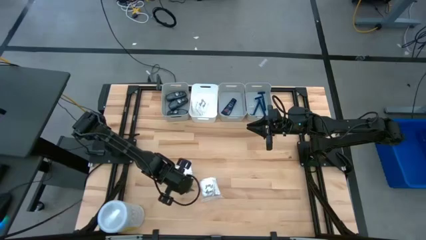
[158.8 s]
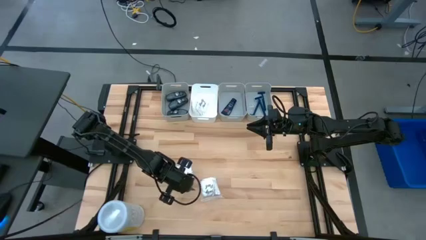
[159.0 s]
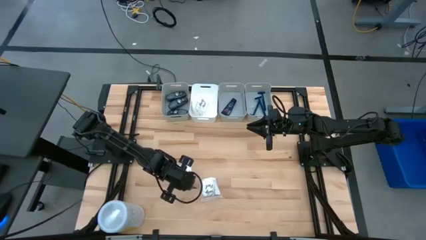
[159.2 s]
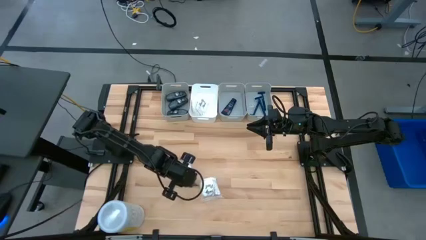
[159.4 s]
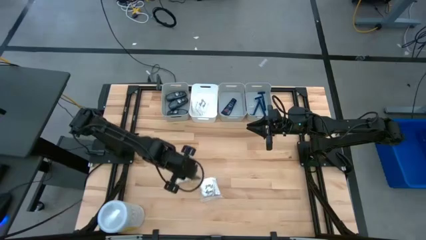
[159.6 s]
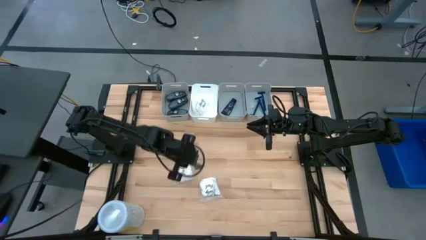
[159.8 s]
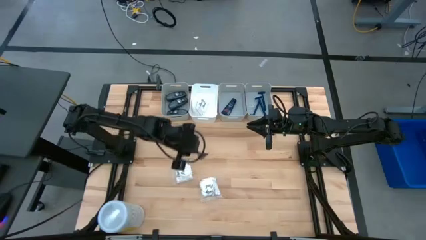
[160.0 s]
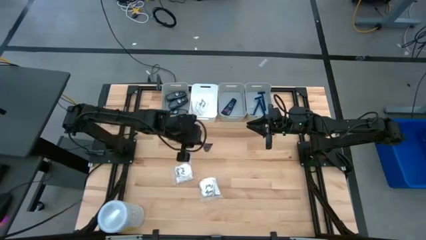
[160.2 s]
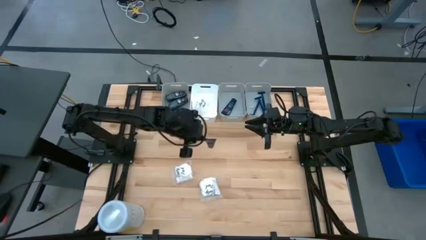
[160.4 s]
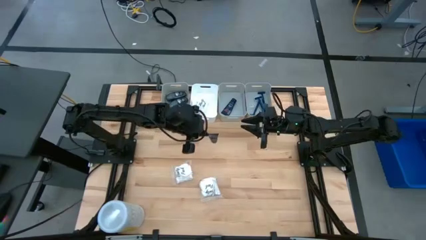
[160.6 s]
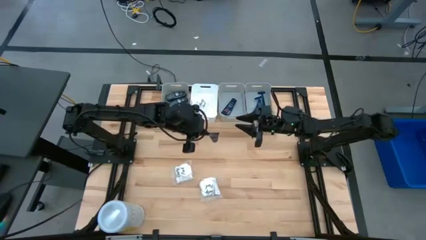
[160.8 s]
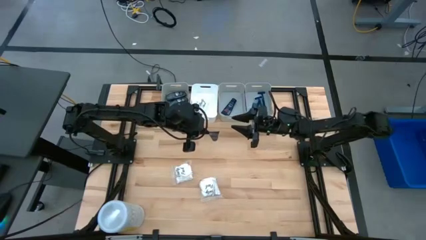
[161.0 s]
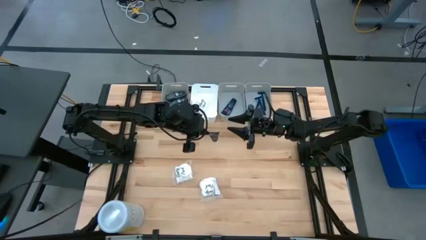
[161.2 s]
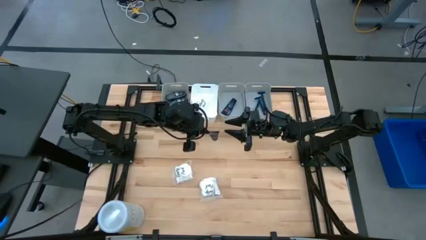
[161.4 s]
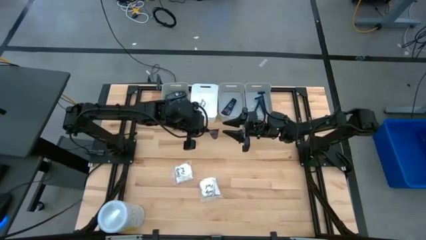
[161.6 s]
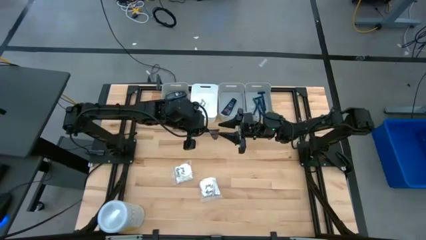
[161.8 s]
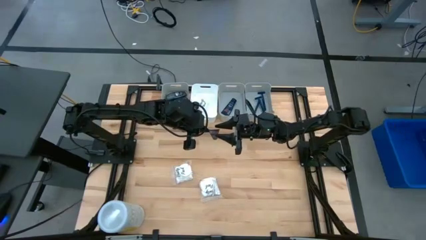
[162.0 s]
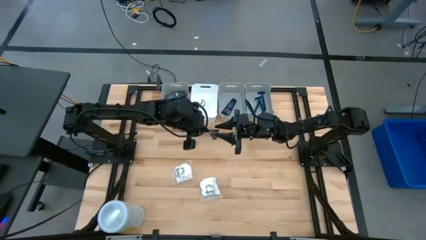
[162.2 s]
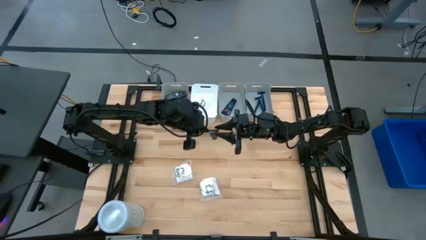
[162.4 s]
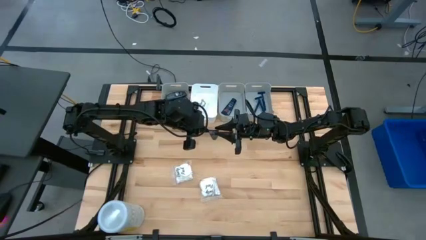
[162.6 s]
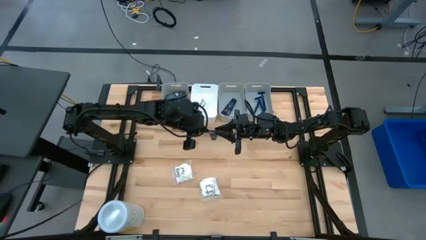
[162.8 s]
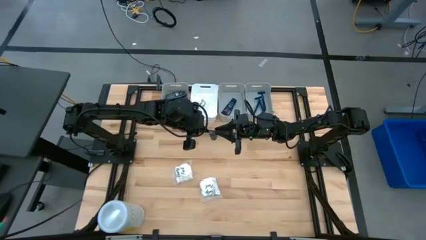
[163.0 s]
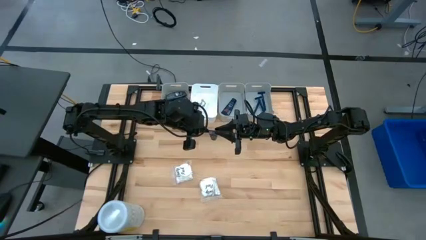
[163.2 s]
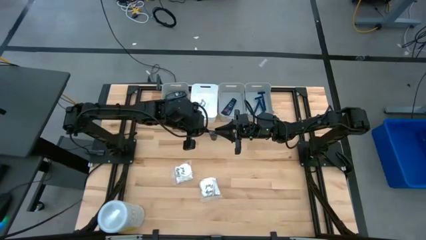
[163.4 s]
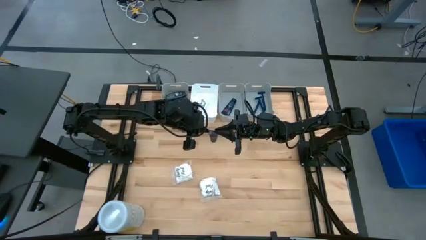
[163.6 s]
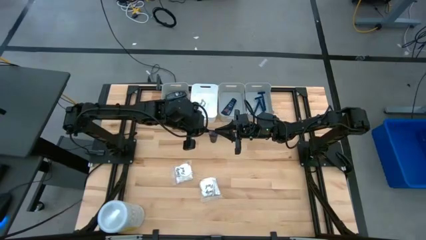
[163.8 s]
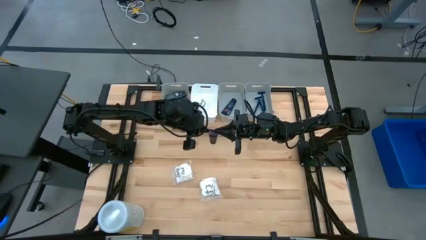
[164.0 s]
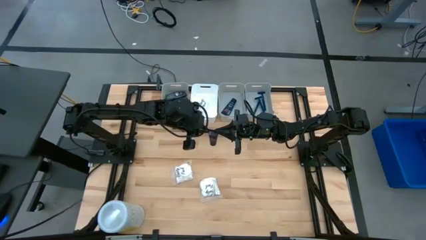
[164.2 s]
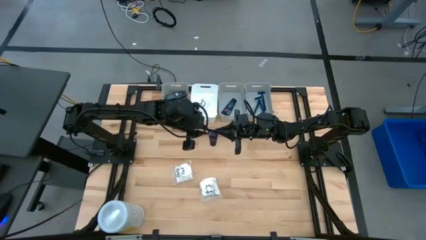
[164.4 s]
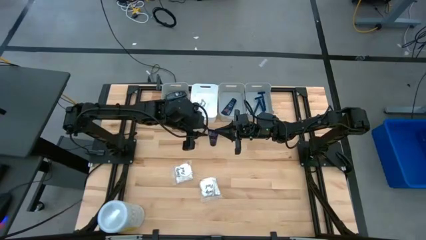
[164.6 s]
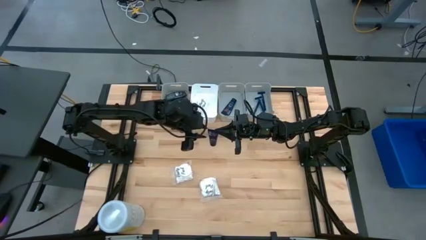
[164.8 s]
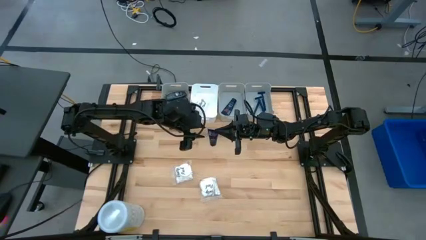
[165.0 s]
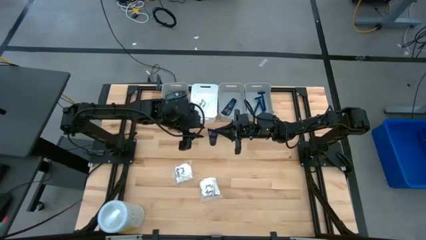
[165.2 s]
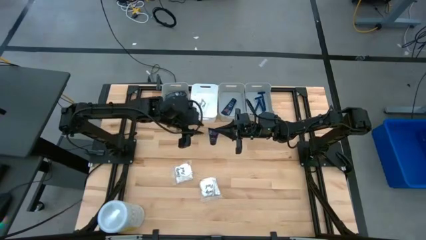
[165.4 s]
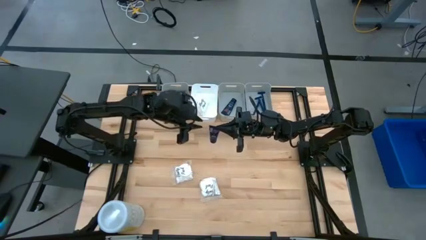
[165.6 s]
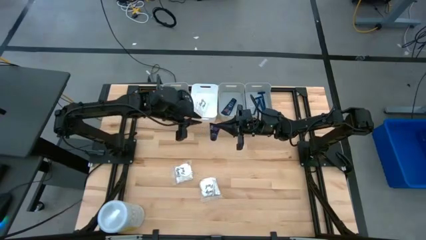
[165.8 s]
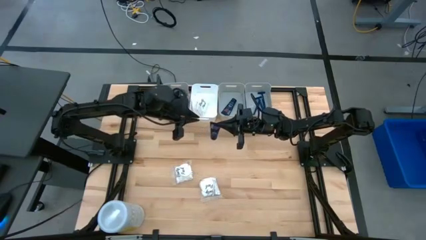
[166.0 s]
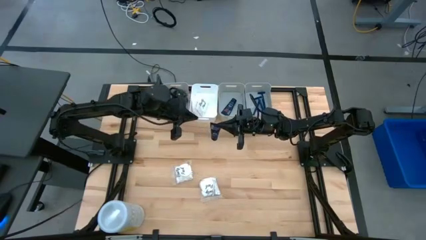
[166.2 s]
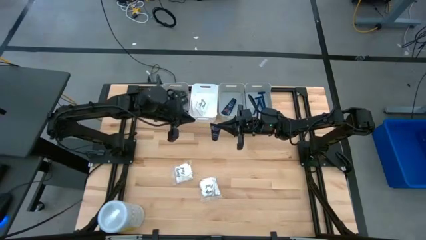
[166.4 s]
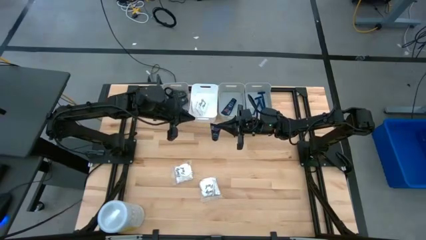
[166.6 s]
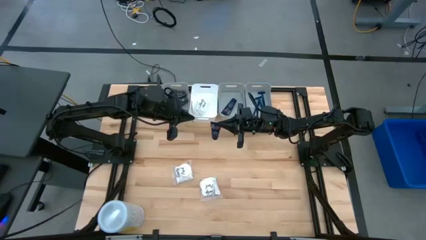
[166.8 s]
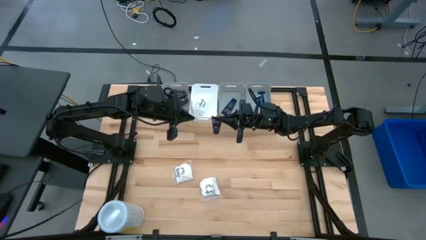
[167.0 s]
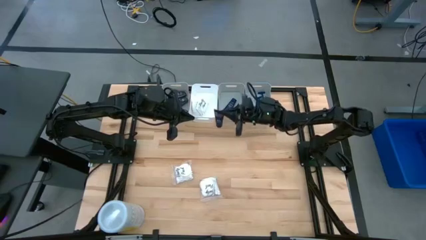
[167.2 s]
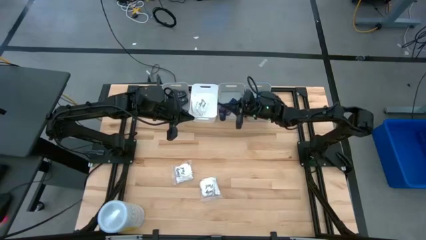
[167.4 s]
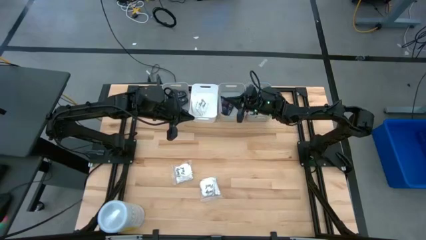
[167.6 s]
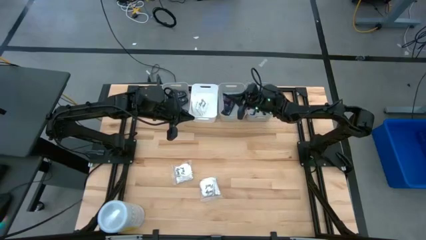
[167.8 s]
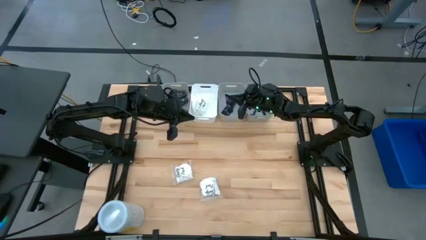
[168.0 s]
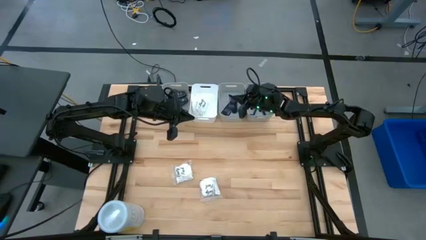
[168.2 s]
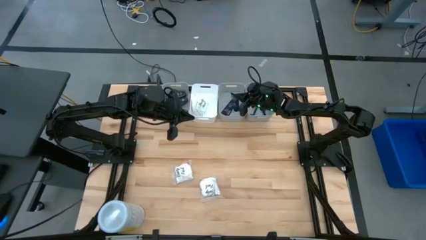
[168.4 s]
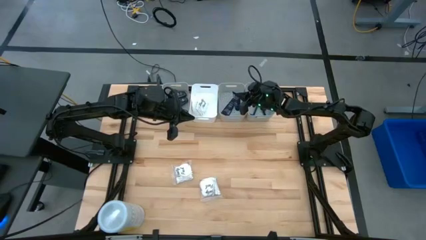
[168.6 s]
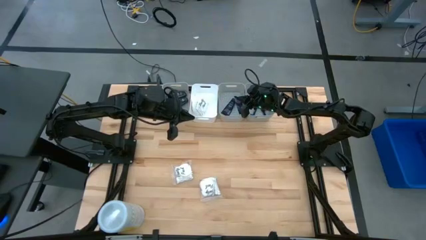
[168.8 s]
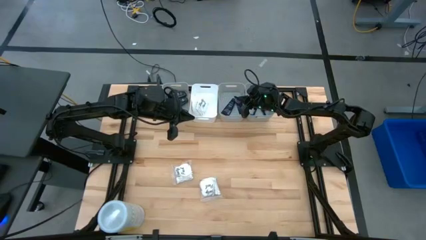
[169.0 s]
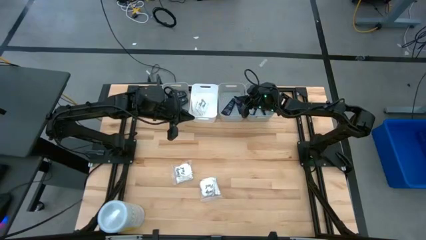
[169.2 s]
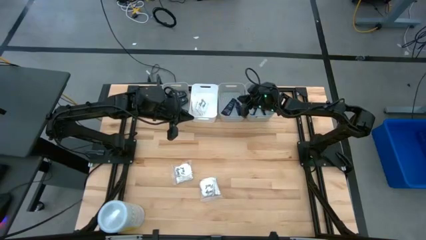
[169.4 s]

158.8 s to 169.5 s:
Task: Pick & Place Travel size toiletries
Put the blue shave cream into the middle gray bin

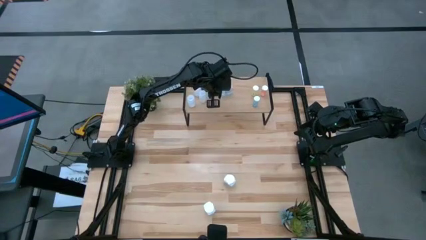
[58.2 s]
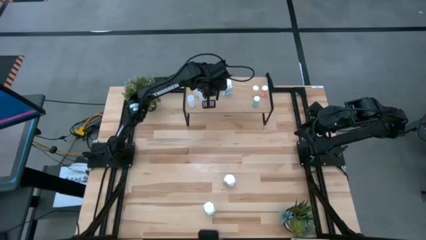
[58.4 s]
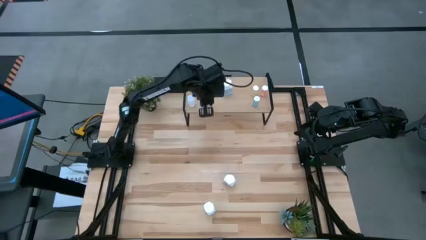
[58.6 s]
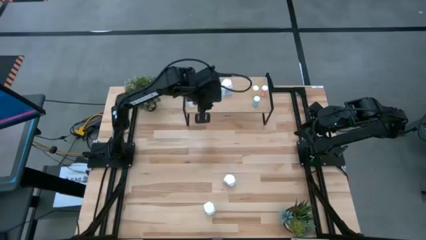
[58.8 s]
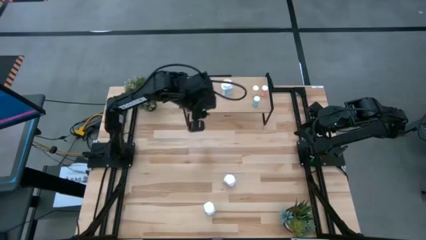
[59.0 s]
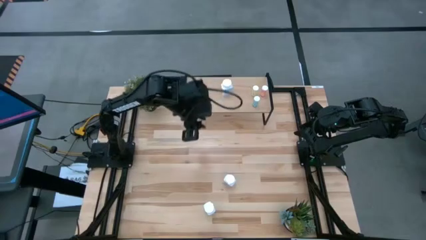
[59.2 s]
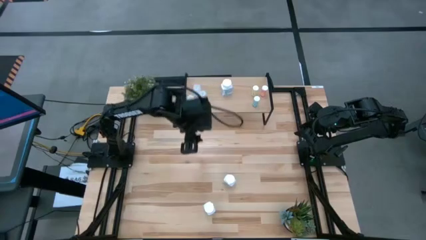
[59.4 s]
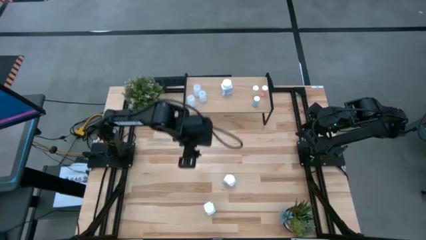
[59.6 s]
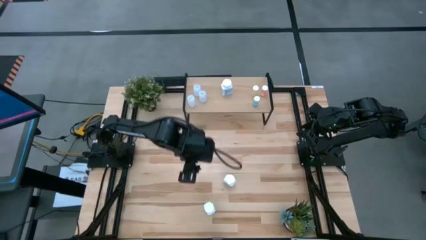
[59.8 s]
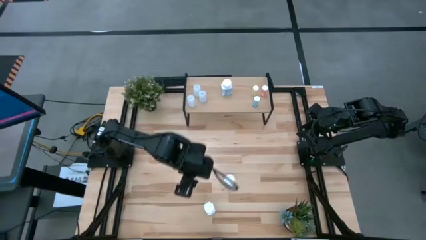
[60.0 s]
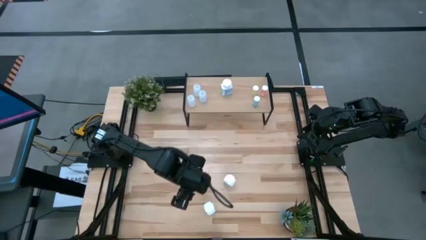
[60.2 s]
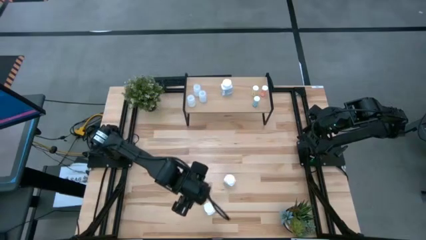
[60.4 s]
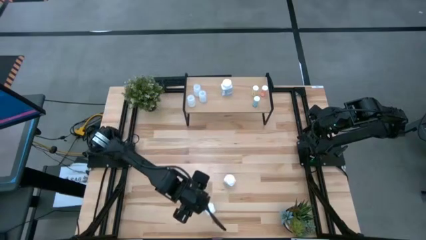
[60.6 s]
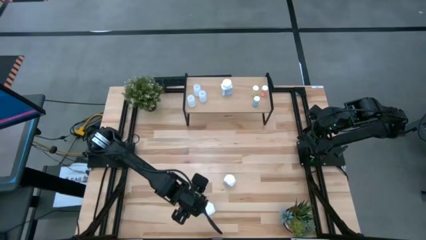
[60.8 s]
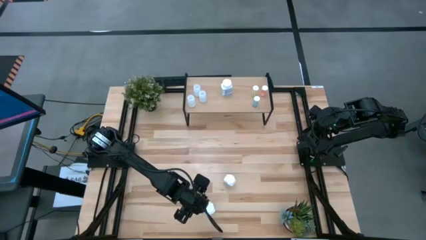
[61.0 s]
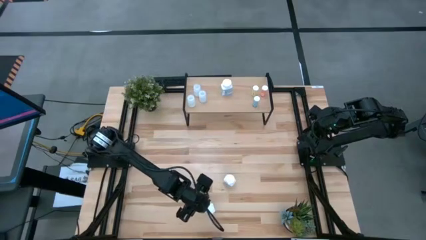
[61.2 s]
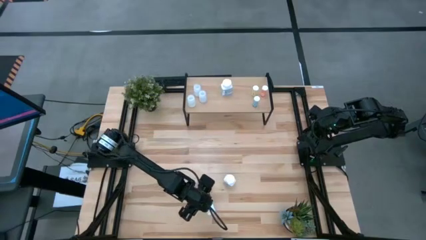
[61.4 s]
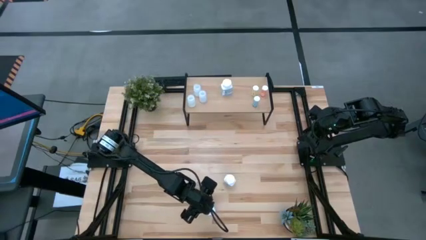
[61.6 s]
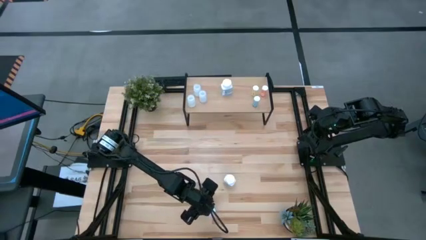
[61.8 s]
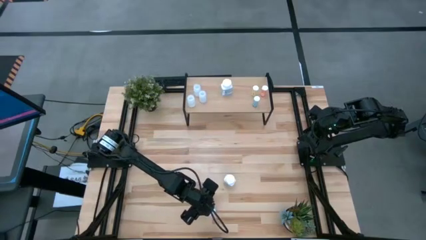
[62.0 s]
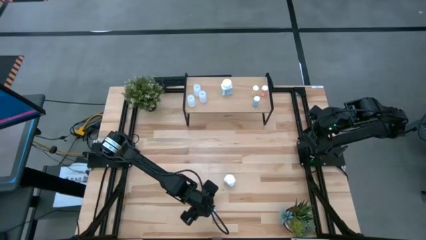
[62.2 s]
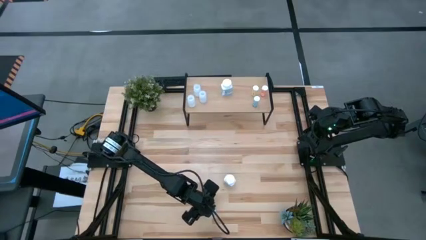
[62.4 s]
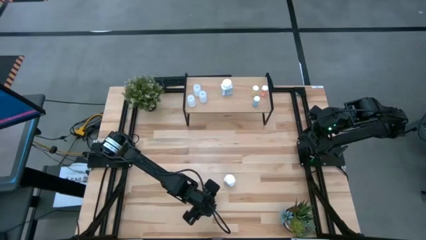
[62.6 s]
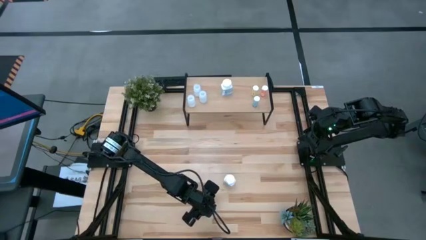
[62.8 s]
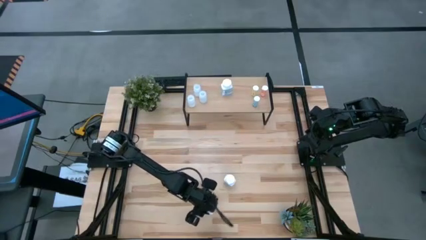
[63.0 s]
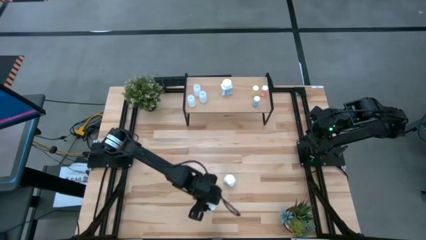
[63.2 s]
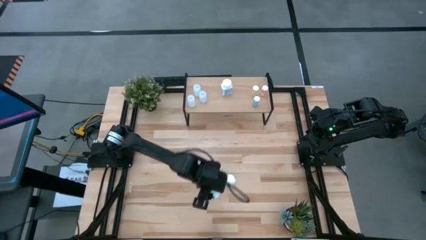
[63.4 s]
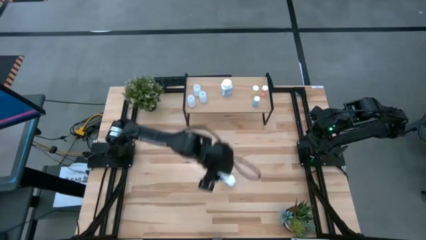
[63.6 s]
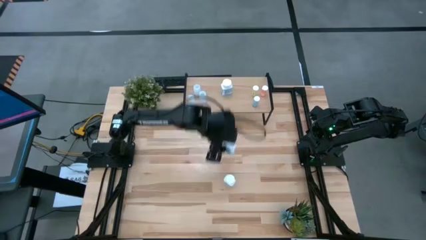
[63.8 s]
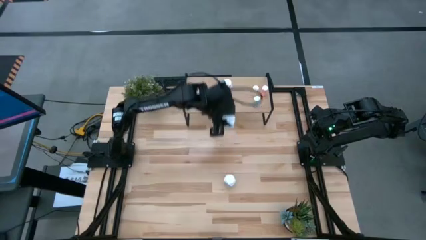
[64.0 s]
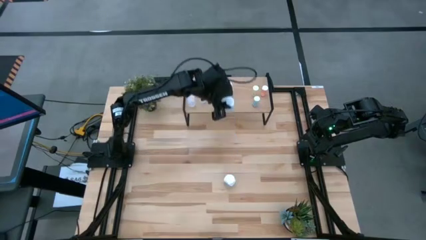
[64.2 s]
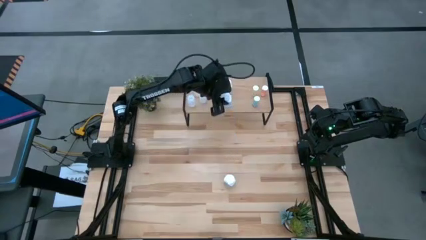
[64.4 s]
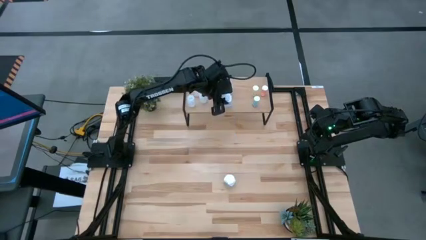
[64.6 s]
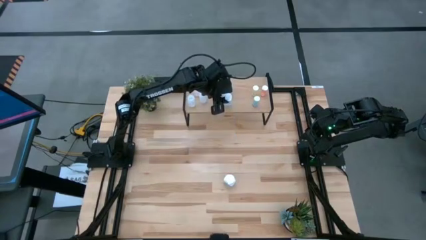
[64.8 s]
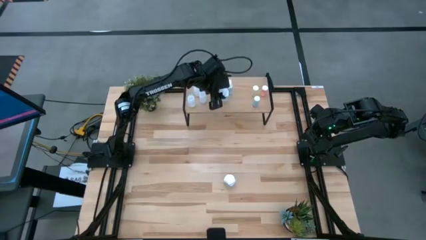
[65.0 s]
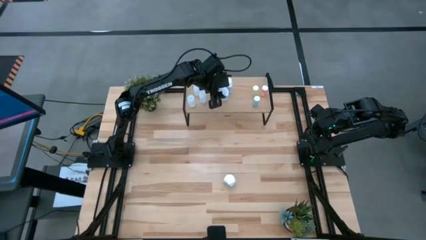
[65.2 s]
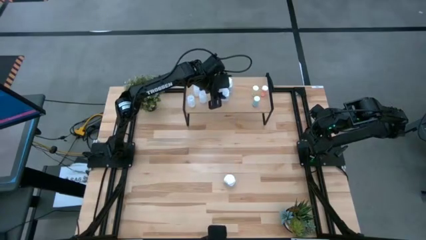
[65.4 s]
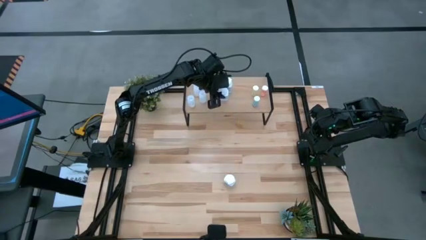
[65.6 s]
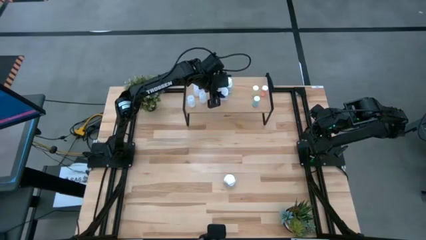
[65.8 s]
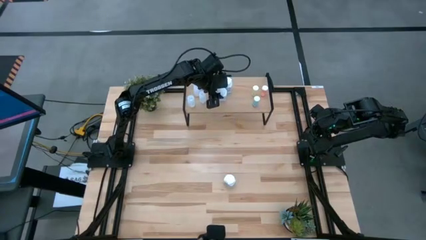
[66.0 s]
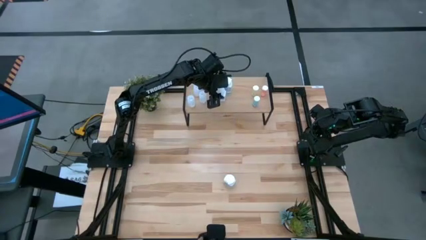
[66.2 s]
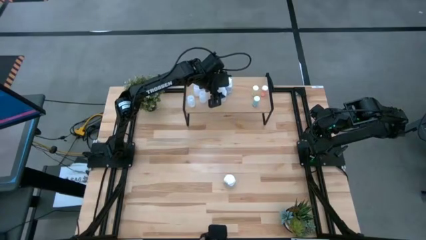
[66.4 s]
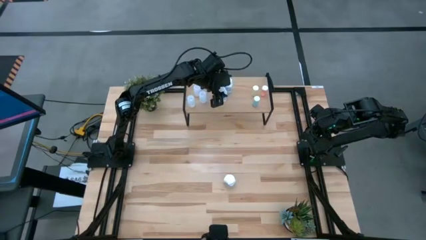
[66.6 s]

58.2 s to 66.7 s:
Task: Pick and place medicine bottles onto shelf by color
Put the bottom white pill bottle on the shelf
